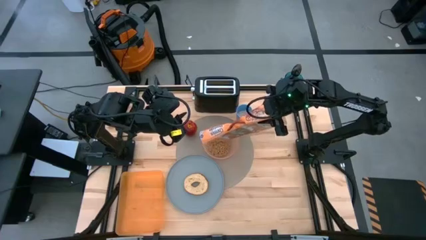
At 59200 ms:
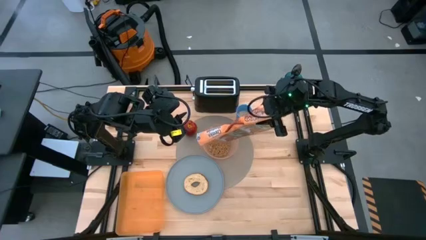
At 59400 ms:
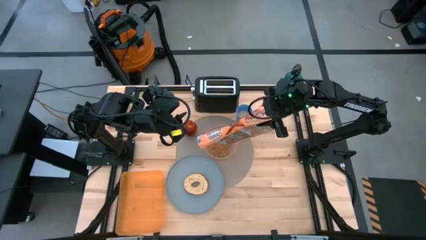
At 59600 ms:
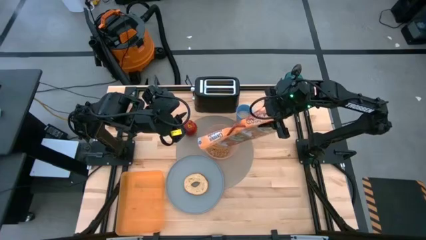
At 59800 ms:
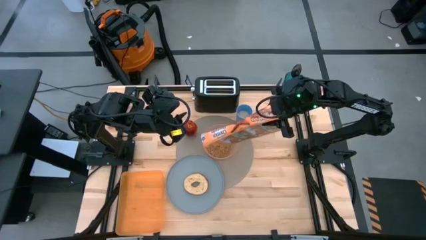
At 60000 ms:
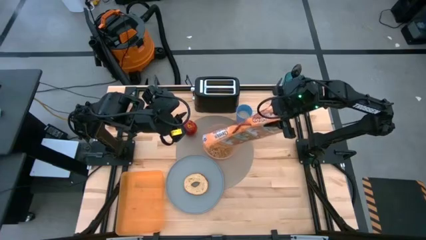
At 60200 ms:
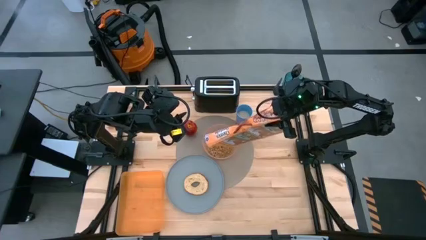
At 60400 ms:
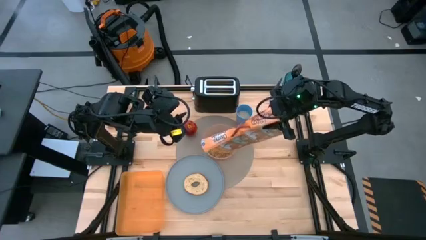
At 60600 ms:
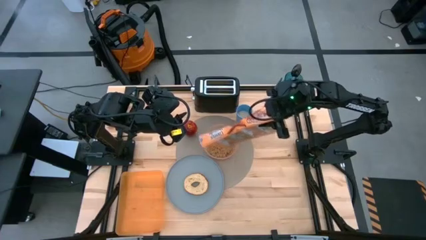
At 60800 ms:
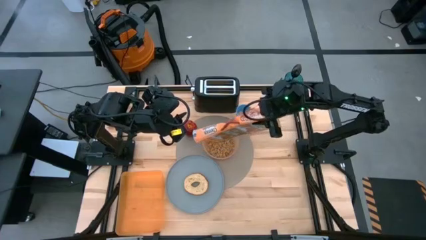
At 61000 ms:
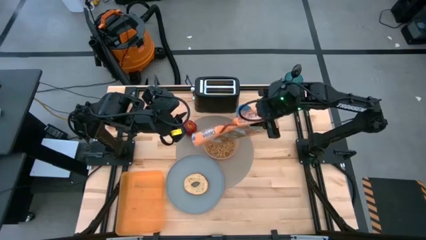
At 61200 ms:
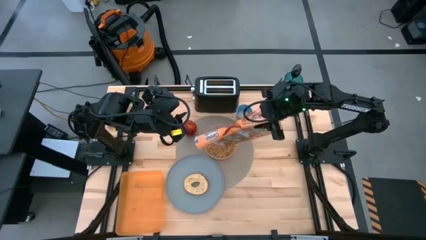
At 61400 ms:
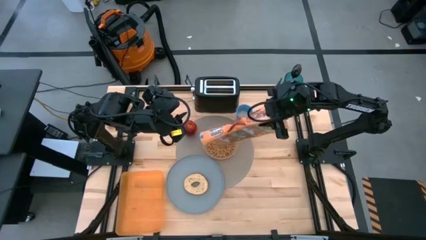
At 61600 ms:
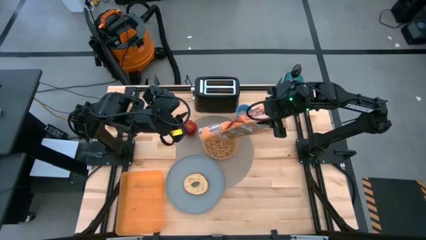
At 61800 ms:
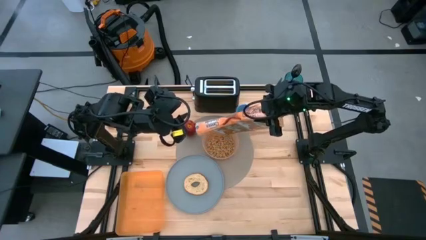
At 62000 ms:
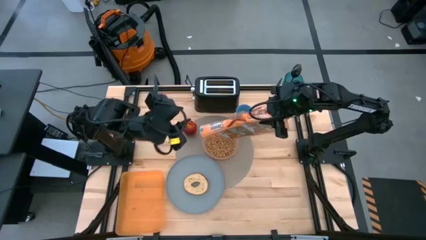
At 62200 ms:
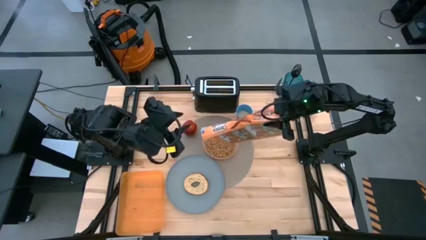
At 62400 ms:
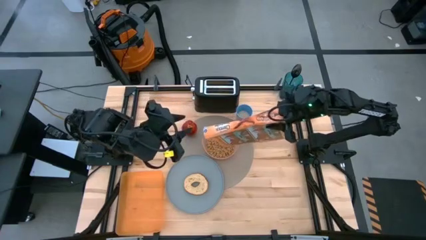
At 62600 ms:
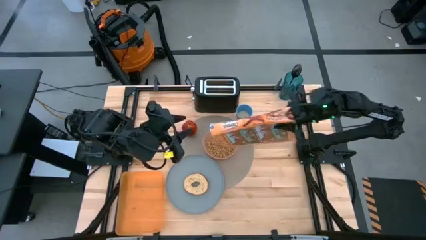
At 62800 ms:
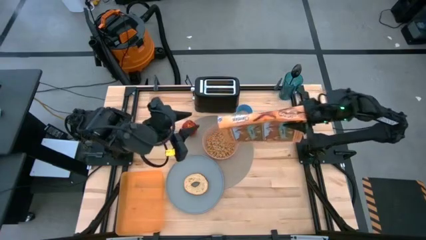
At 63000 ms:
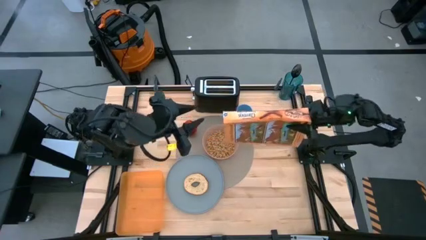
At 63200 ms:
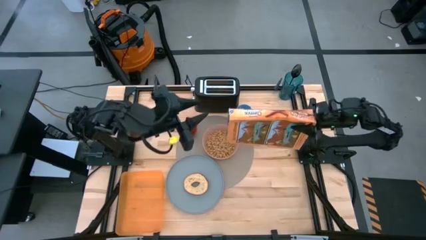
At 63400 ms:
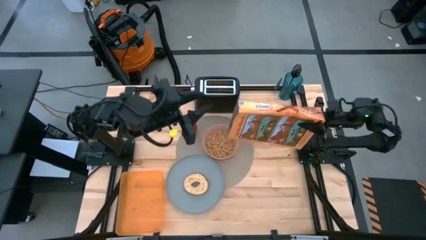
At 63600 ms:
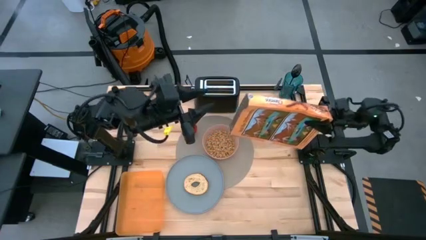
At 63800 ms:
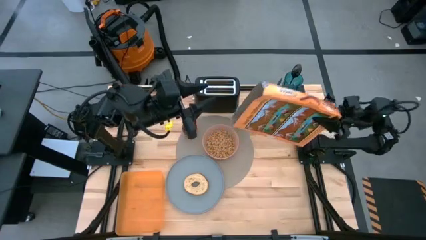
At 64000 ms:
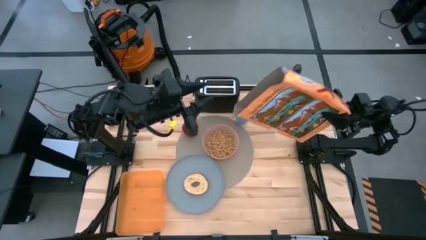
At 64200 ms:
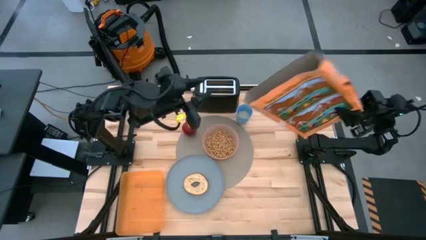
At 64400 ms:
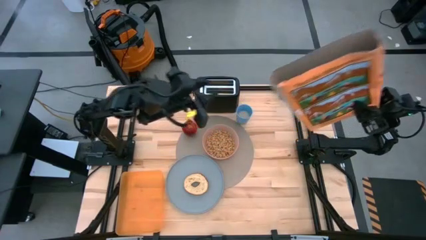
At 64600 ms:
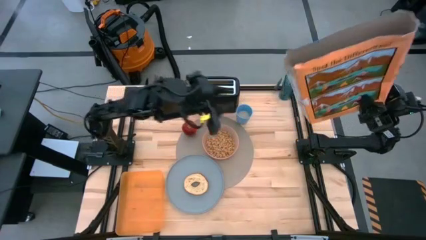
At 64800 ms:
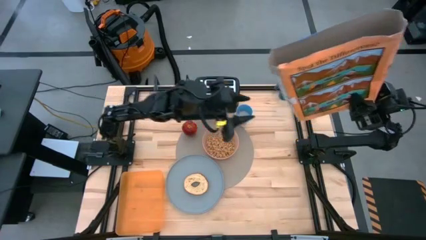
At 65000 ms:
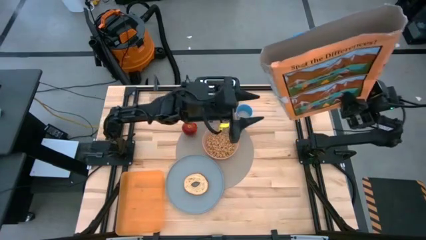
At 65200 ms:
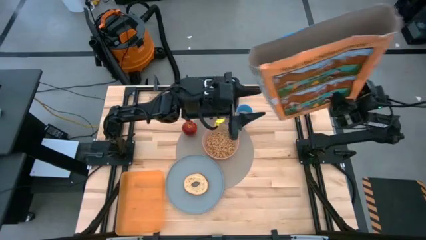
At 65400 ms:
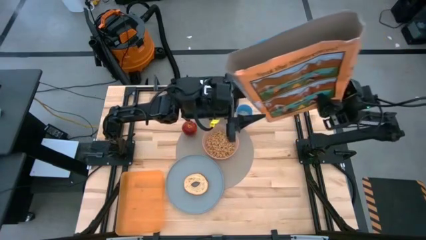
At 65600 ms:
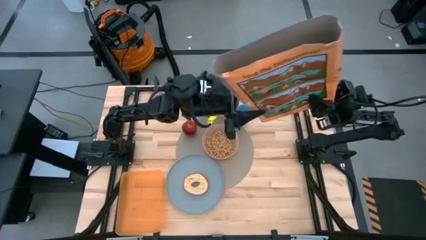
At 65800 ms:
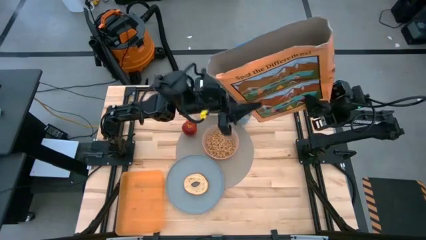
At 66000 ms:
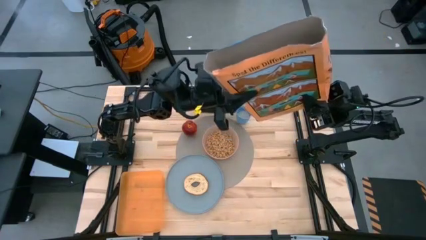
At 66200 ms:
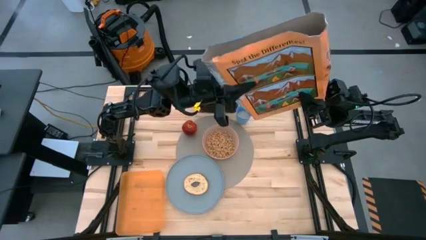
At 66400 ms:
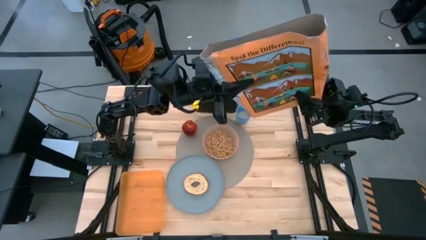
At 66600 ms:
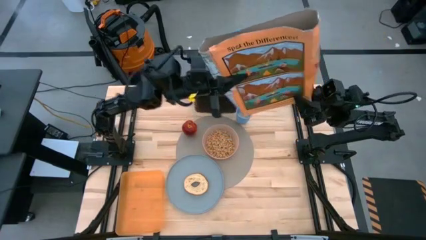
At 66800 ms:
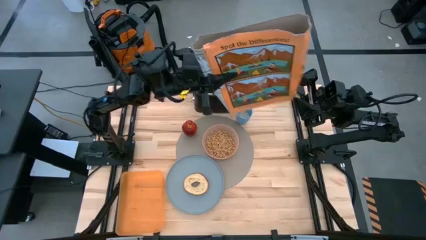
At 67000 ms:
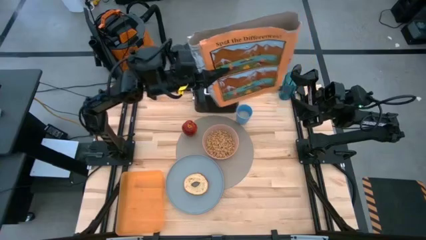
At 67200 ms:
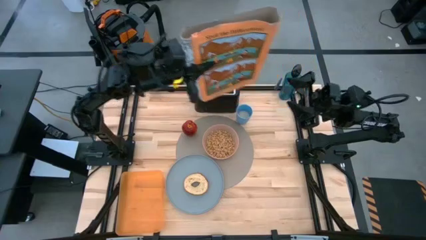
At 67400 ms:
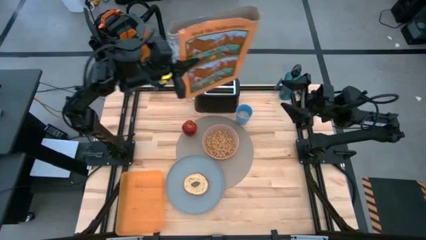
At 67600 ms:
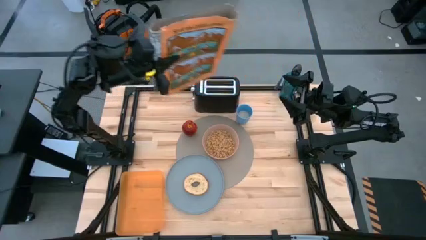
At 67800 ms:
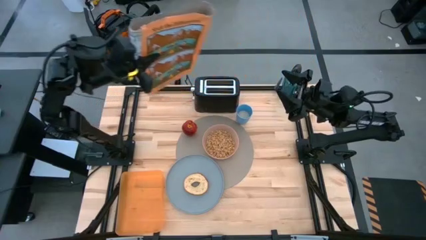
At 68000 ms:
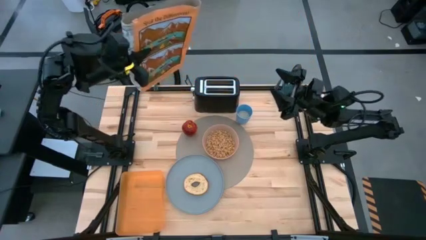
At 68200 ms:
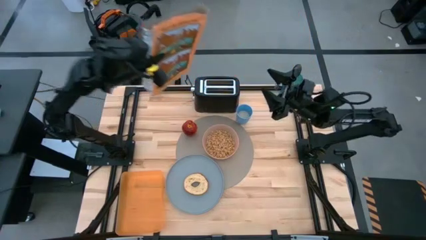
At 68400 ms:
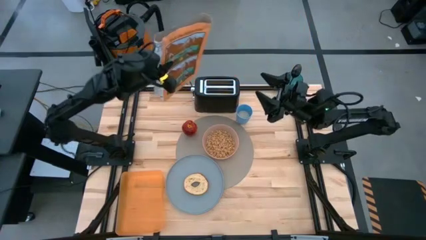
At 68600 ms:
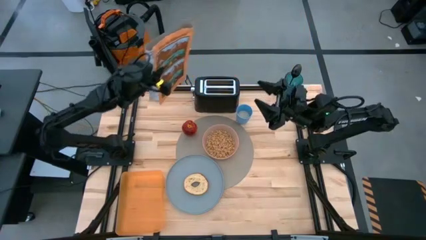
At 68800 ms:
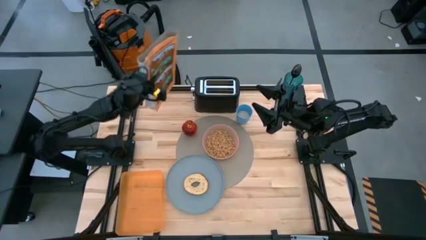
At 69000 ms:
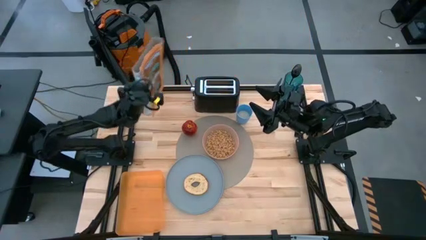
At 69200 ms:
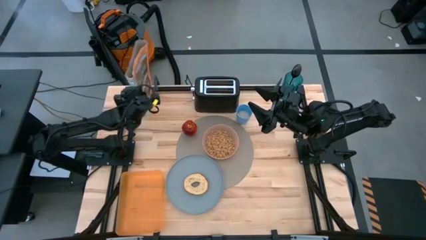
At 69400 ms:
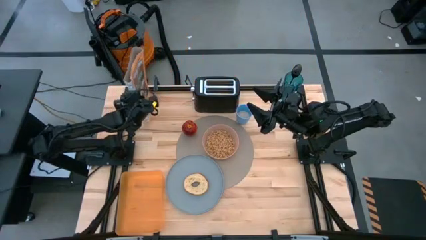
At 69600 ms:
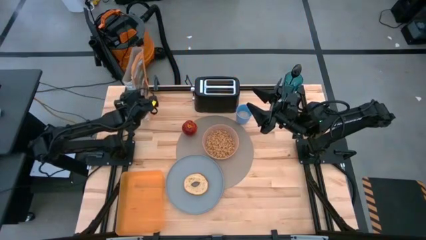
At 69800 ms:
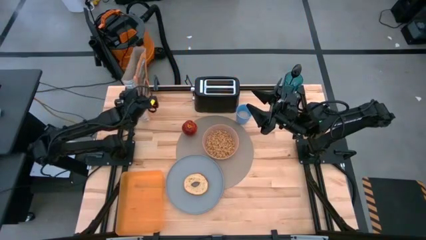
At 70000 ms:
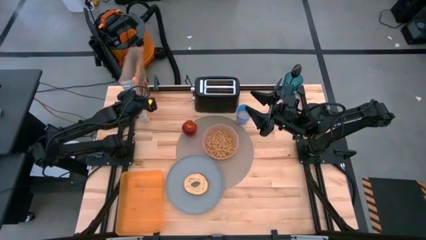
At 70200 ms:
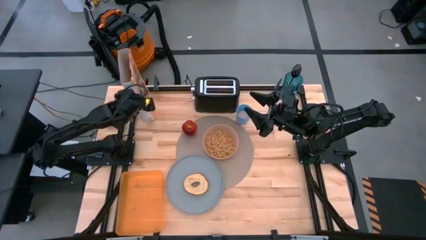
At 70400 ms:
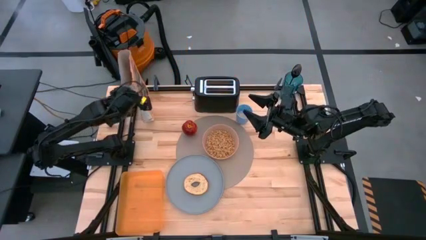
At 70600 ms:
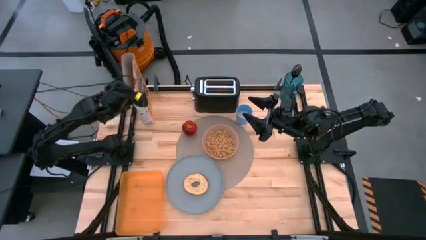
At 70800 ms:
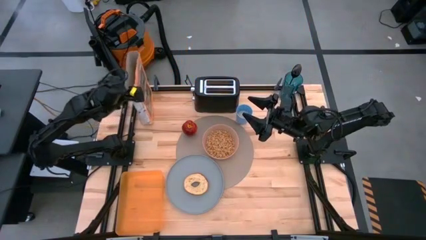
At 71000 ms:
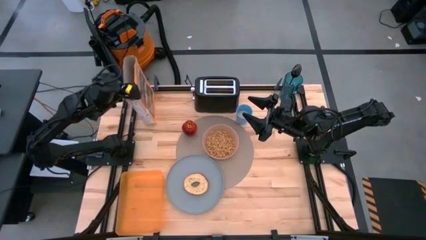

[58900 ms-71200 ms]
Task: Arrange a breakfast setting
Pour the cereal from the cereal box into the orange bowl
